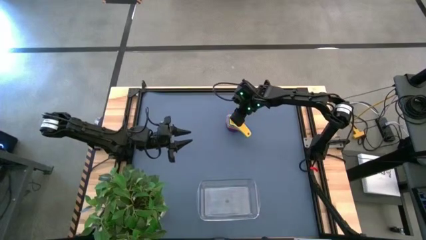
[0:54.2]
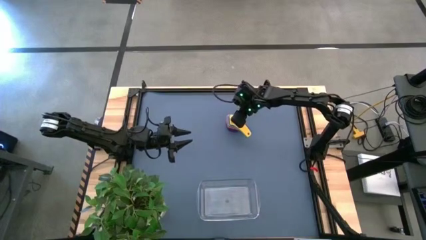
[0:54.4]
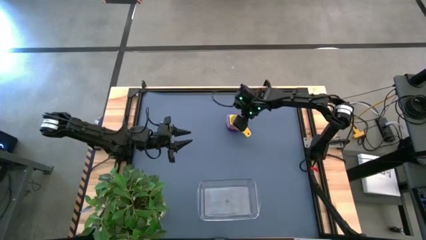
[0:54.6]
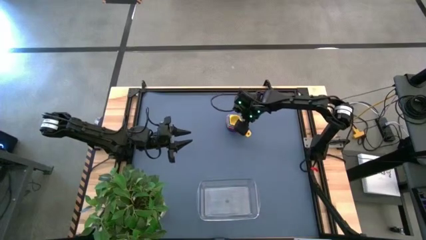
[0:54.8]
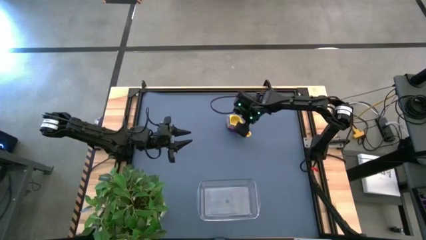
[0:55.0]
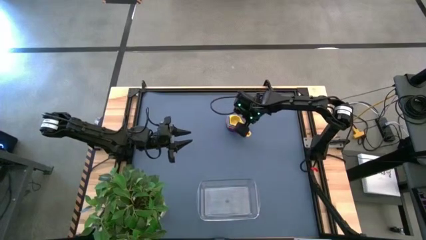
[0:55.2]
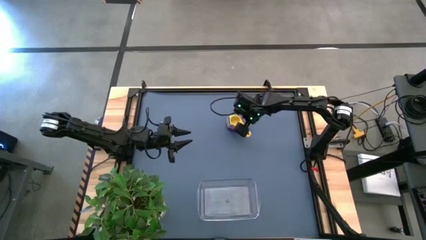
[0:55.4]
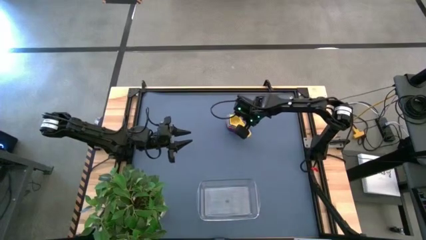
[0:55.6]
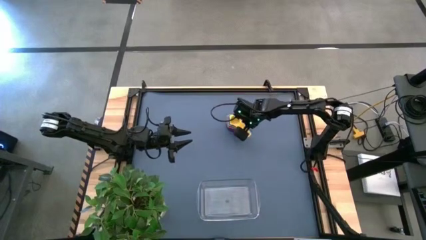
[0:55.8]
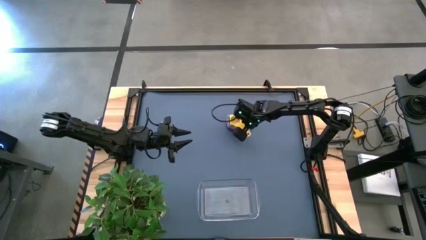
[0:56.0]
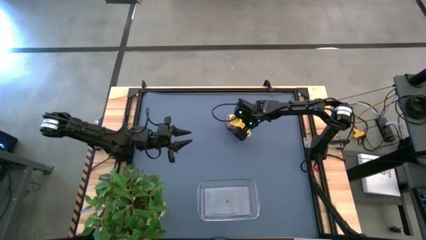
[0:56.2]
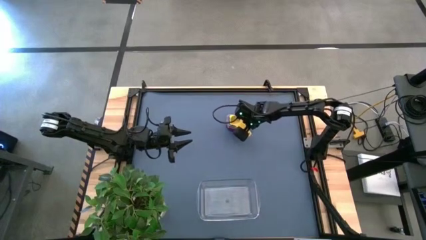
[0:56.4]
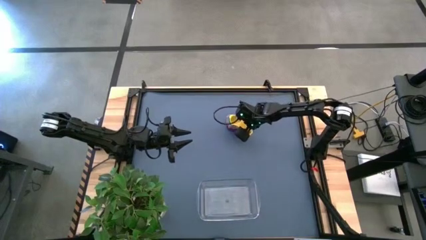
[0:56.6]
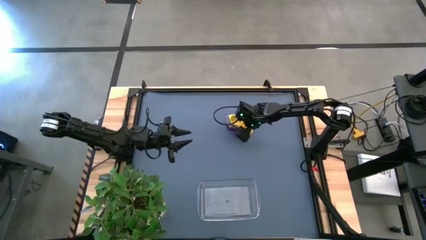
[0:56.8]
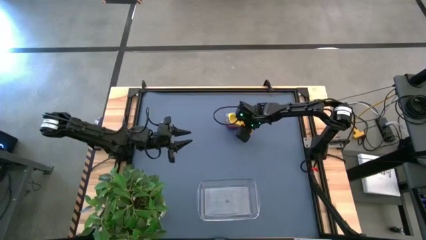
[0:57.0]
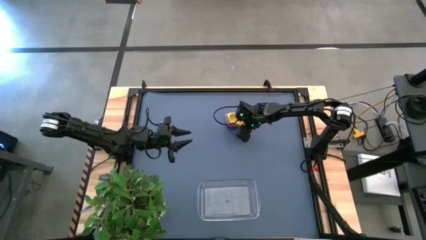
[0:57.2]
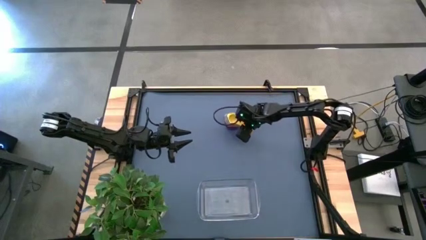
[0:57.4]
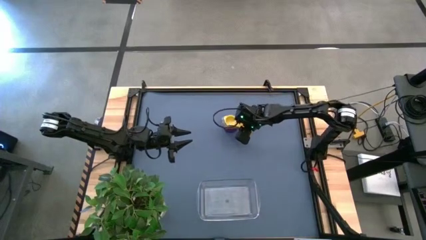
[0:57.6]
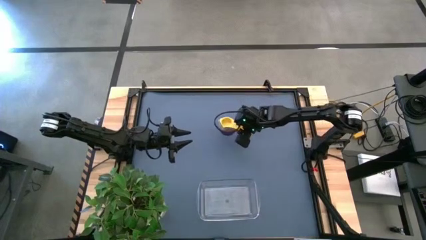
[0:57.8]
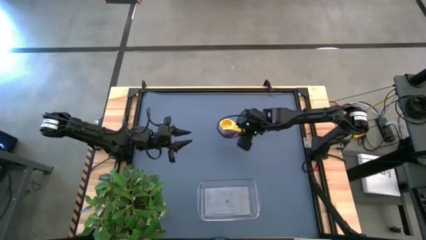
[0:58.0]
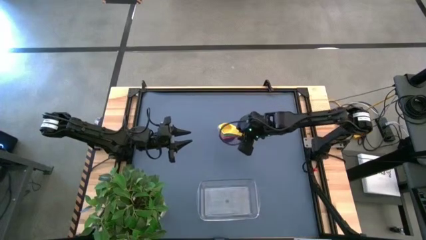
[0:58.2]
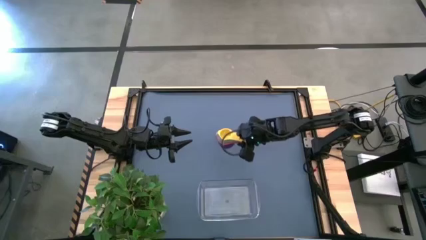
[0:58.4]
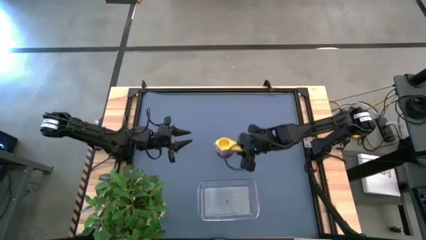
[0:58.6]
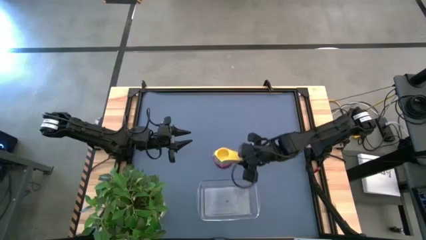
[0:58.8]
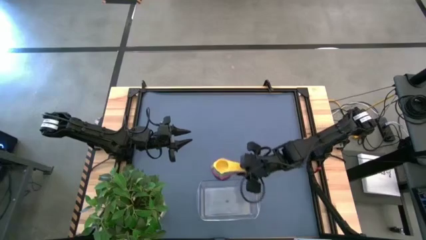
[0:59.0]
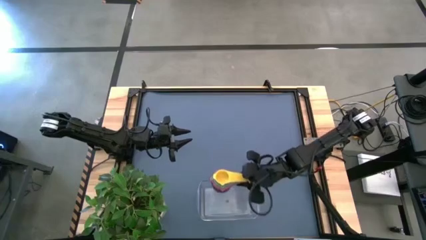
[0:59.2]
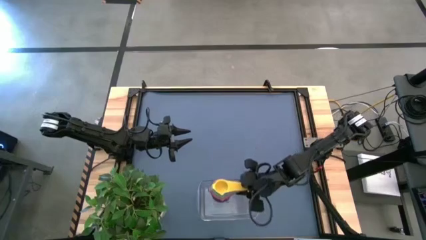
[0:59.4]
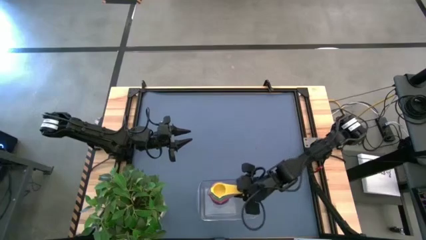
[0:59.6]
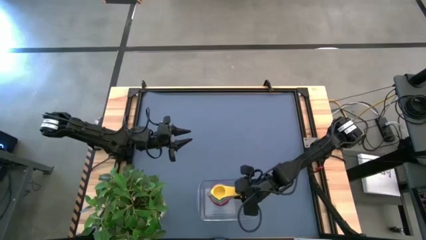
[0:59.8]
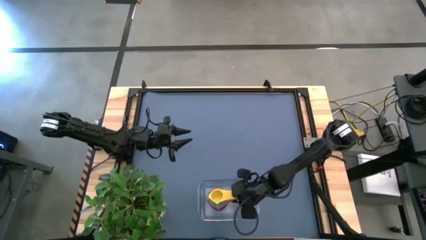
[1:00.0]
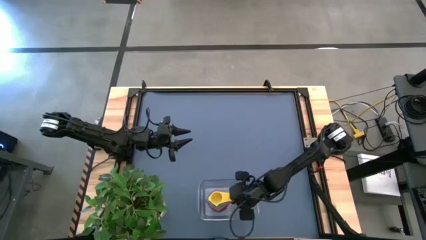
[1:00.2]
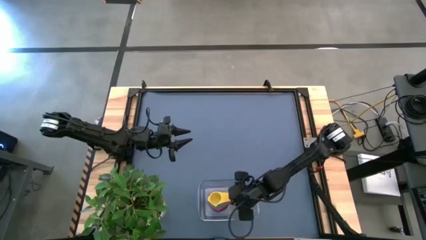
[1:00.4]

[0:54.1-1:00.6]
Task: Nest measuring cups in basket
Put the nested measuring cups into the transparent bin

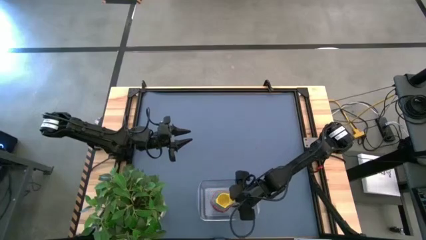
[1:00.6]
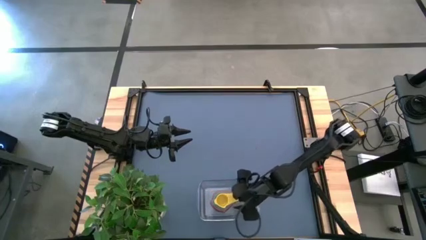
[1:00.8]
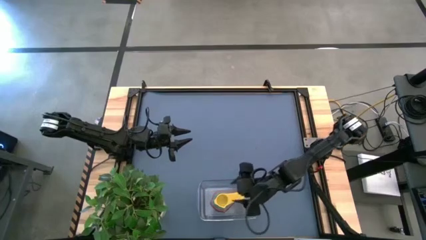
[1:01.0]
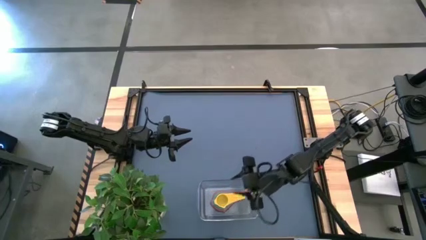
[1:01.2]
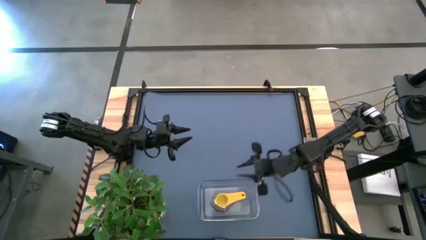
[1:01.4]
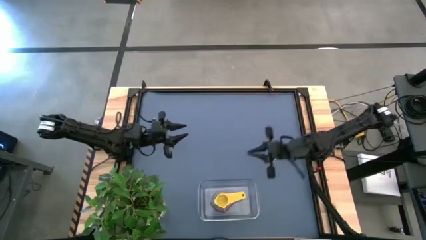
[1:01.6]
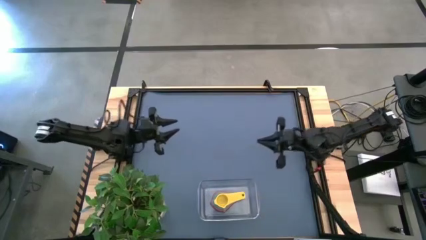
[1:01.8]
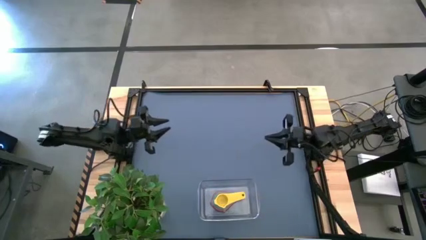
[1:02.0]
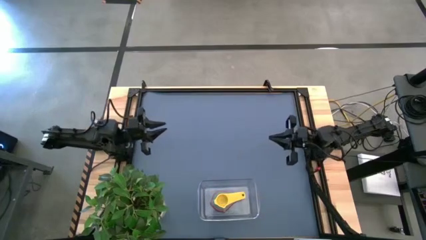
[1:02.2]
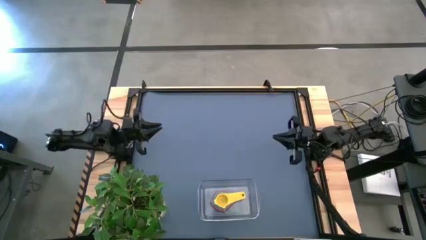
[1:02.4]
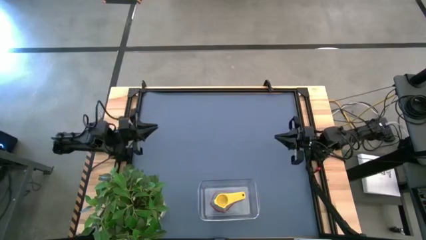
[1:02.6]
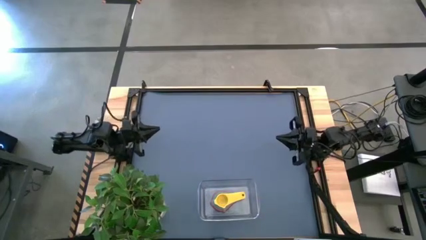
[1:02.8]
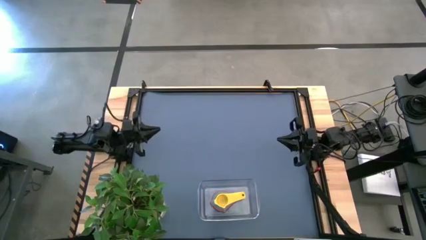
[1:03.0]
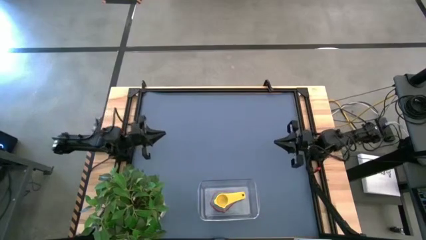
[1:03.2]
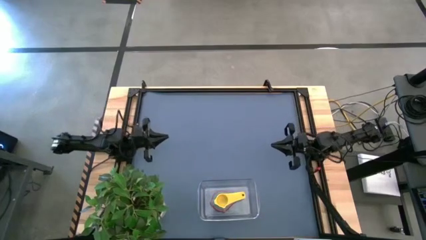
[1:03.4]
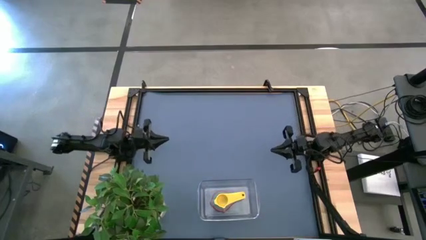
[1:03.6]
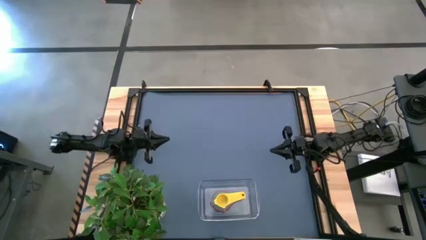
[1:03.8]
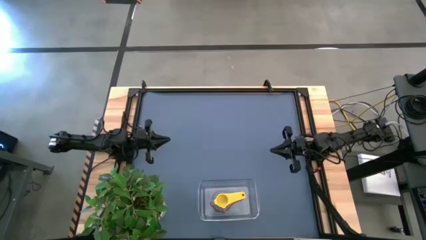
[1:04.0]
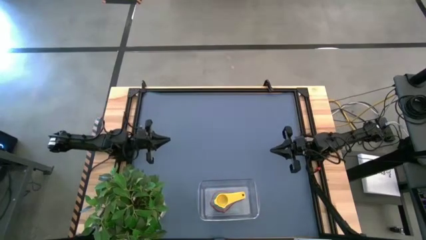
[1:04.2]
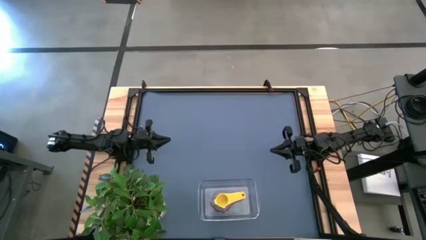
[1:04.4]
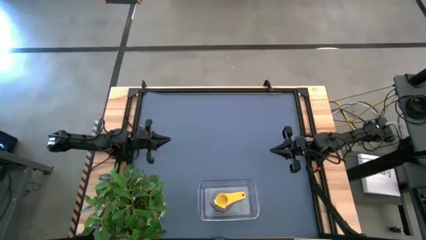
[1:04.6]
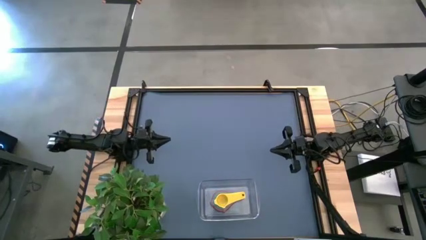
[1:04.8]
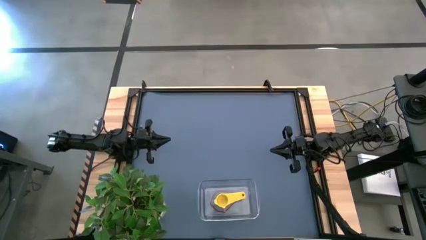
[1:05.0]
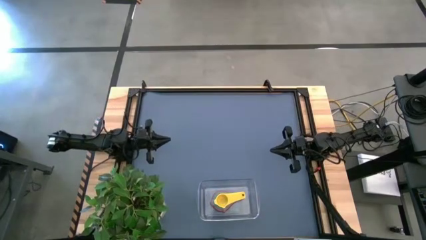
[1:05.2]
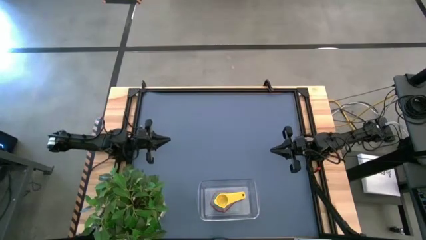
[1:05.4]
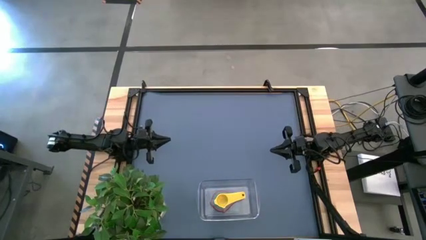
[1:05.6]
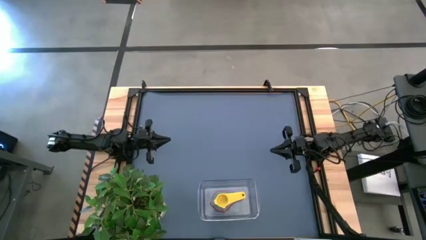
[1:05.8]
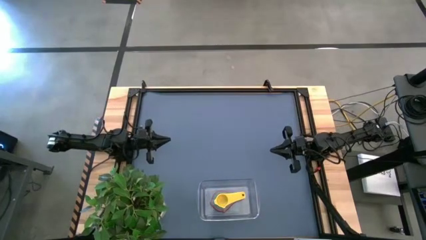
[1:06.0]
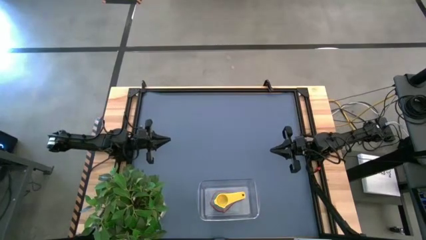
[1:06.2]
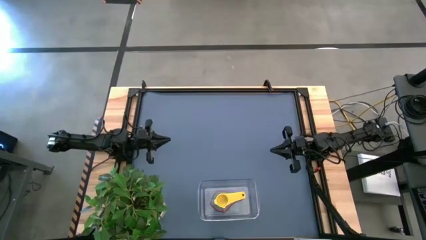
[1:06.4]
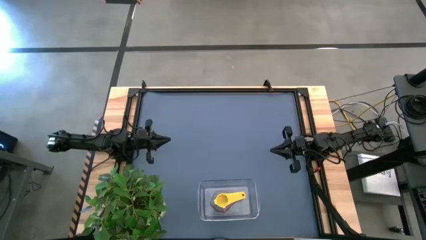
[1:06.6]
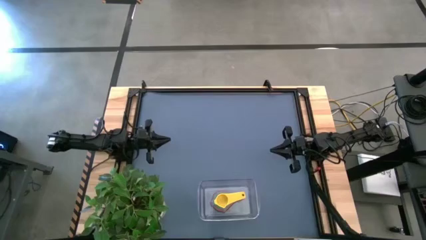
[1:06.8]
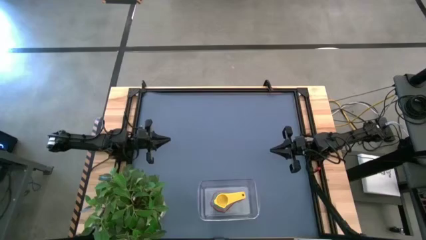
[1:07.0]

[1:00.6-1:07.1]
Return to Home Position

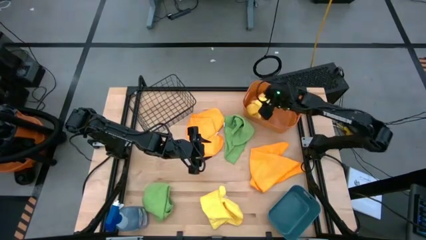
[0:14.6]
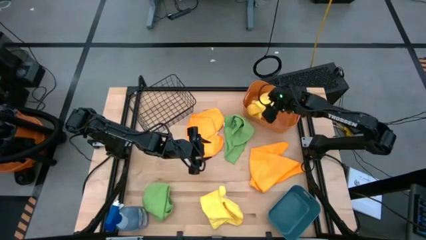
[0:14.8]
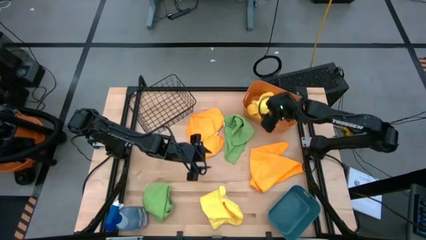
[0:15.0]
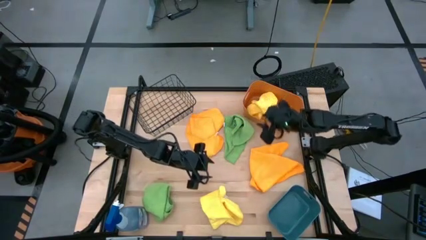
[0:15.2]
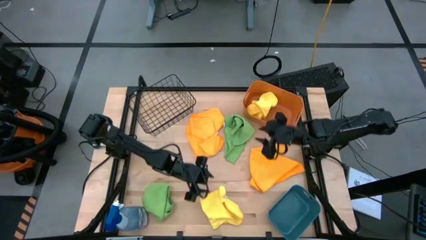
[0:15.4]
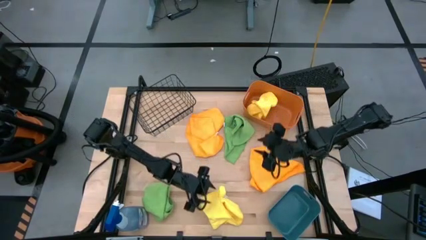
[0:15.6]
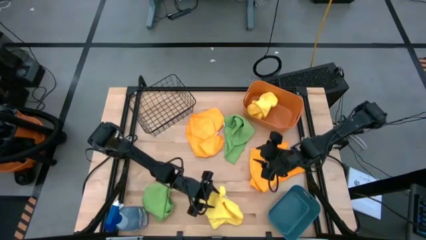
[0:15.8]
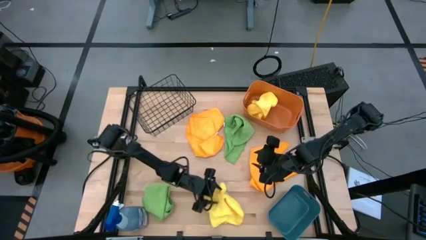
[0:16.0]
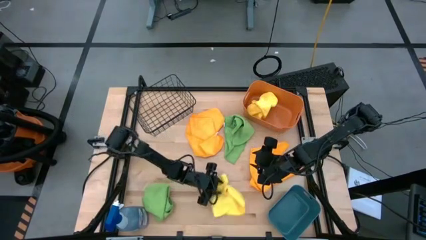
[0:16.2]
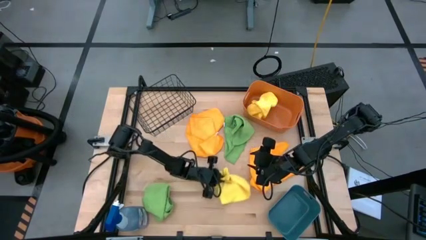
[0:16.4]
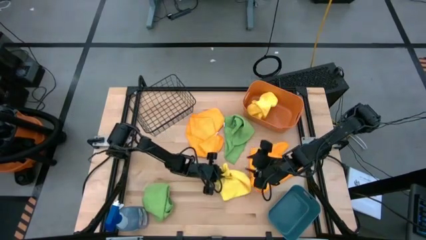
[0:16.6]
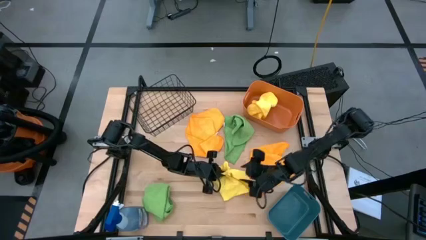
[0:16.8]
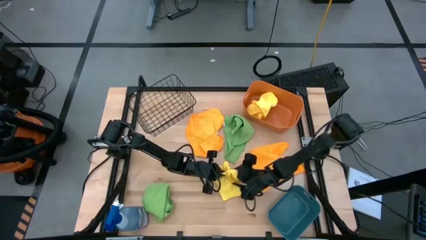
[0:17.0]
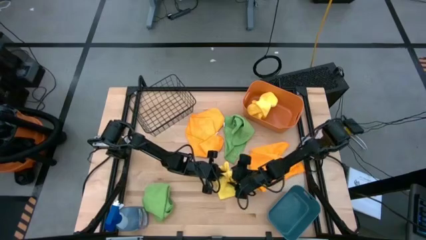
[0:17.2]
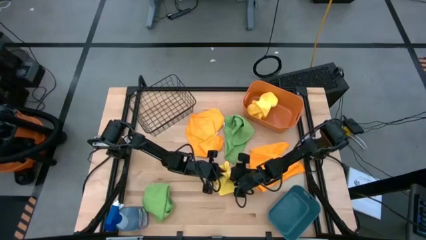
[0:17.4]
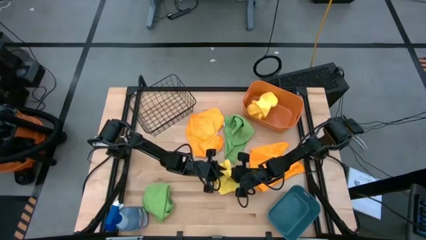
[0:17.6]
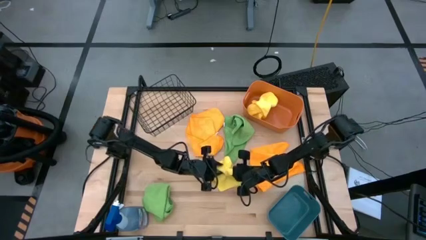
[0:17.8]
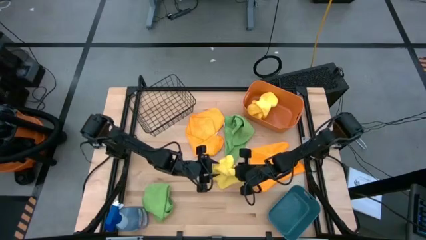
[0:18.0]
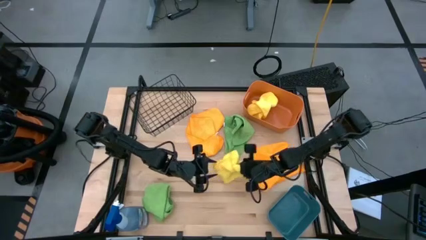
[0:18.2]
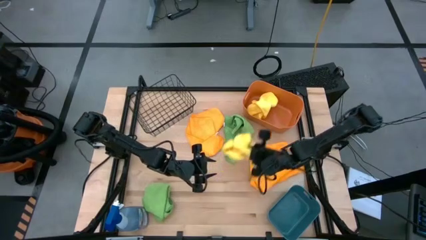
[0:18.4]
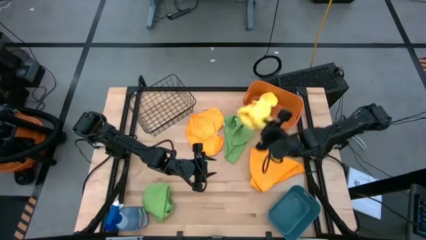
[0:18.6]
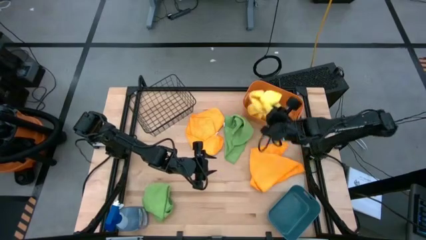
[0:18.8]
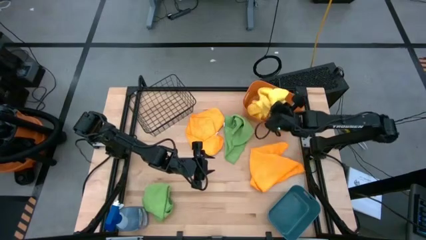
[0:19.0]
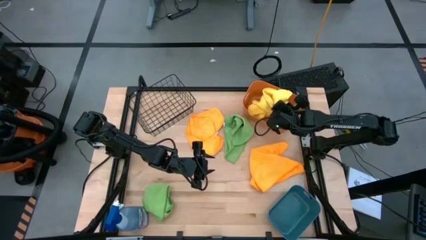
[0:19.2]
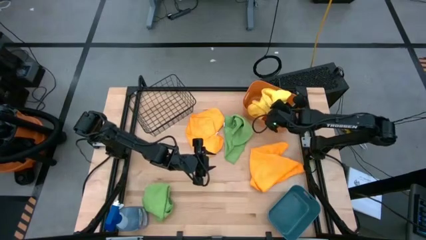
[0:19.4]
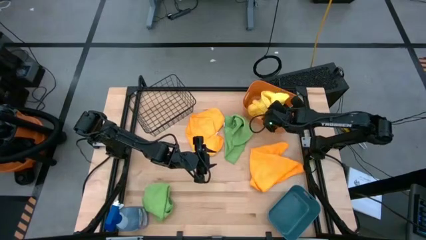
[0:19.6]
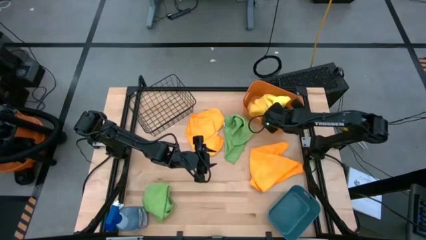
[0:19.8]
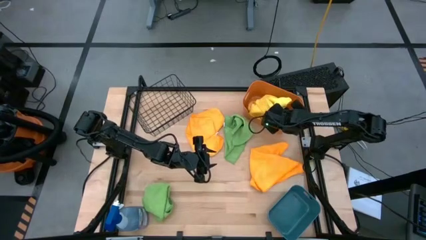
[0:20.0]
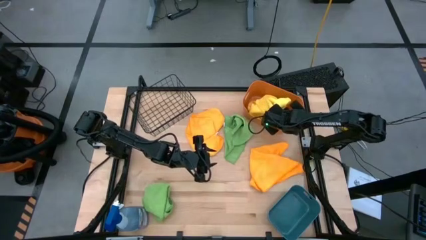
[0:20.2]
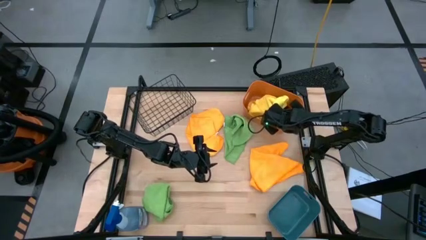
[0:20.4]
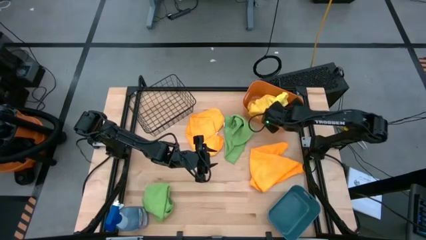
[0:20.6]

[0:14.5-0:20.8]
Task: Sort microfiber towel by color & place in baskets
Put the yellow microfiber cloth into the orange bin
